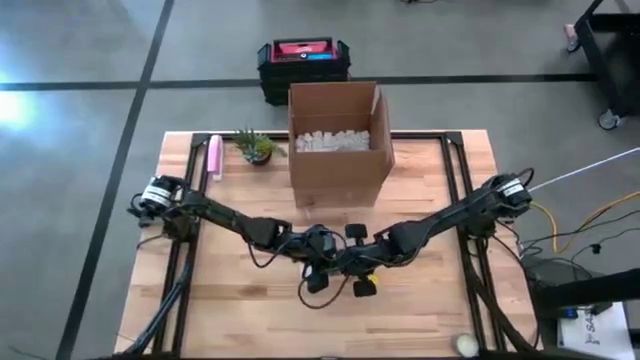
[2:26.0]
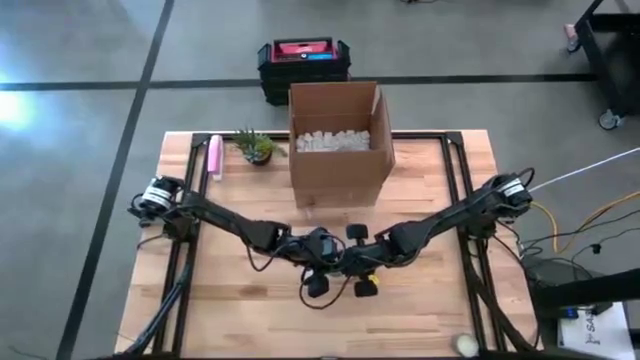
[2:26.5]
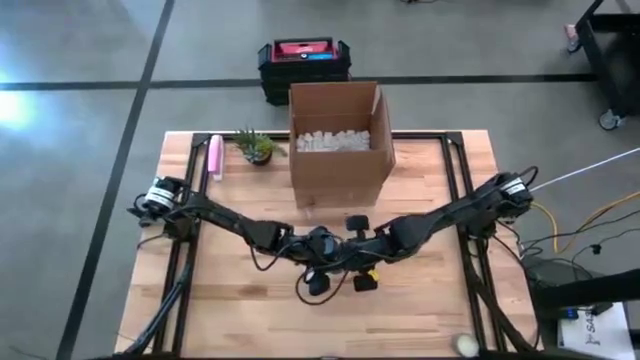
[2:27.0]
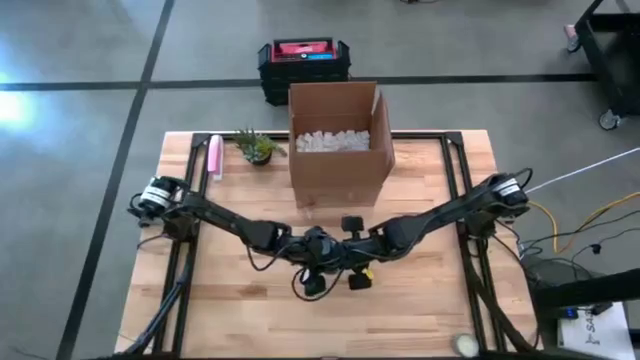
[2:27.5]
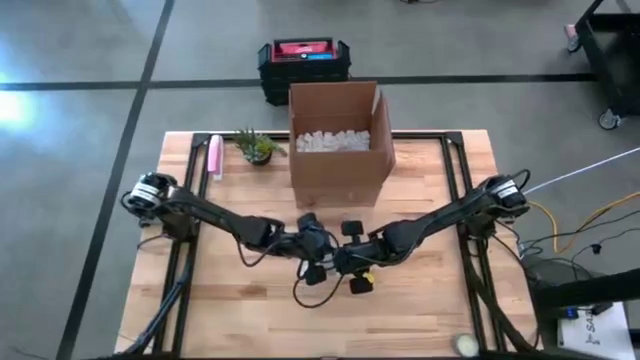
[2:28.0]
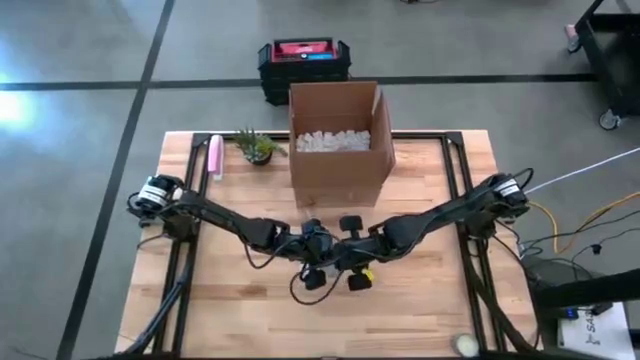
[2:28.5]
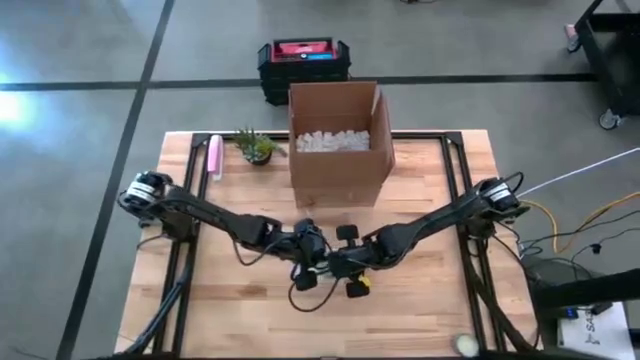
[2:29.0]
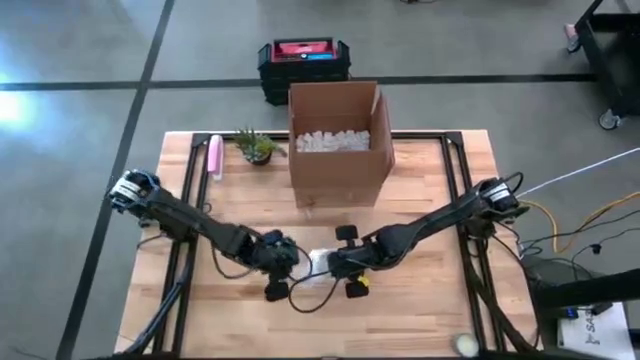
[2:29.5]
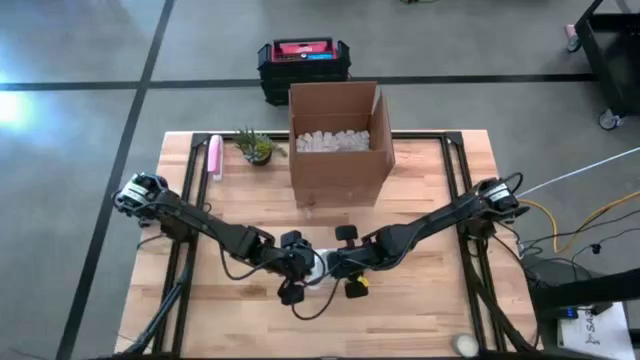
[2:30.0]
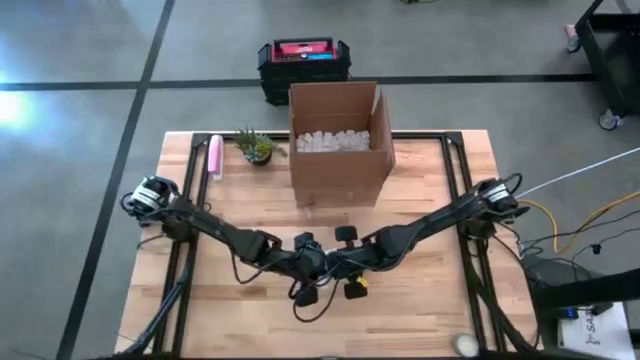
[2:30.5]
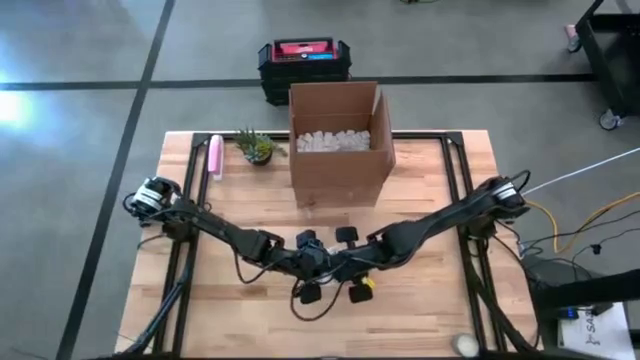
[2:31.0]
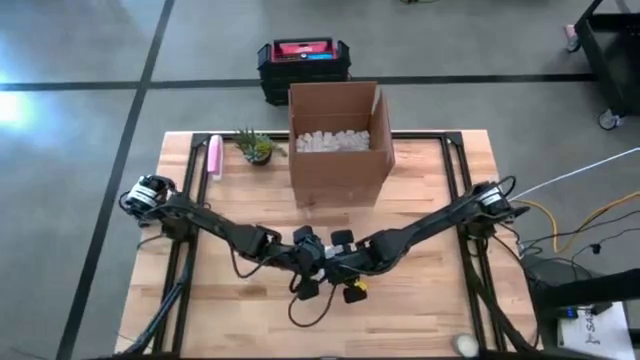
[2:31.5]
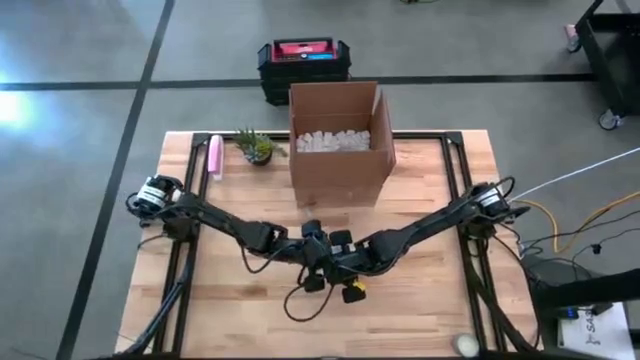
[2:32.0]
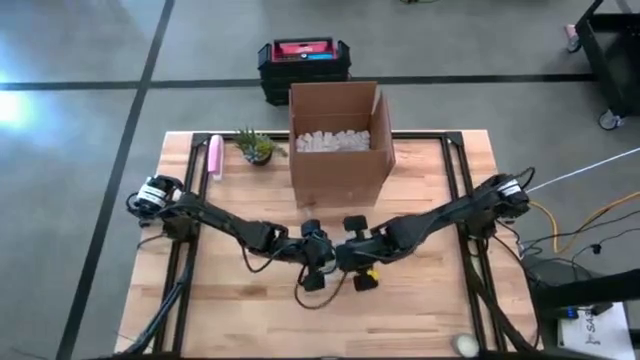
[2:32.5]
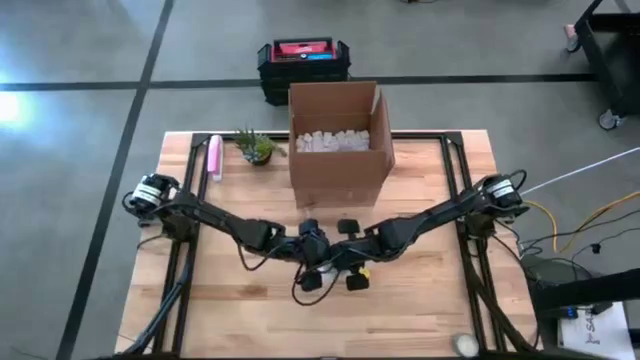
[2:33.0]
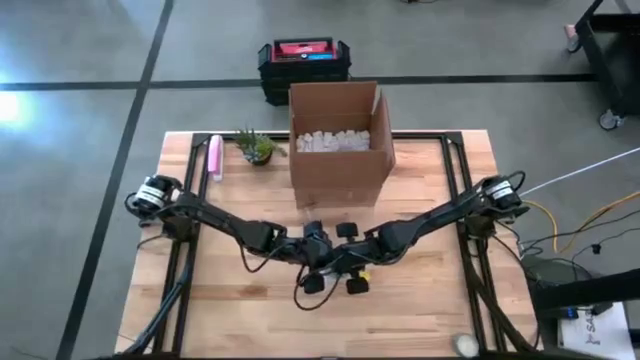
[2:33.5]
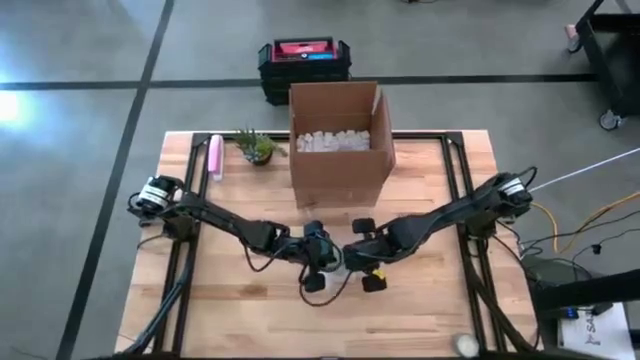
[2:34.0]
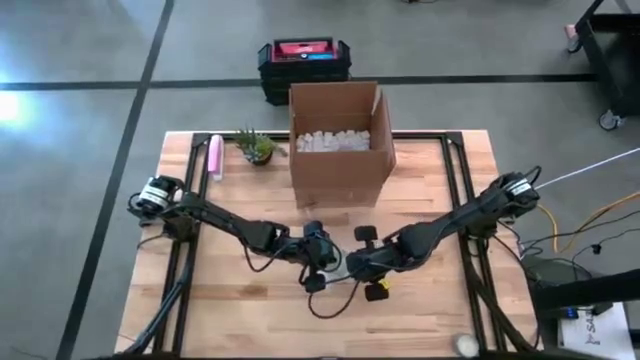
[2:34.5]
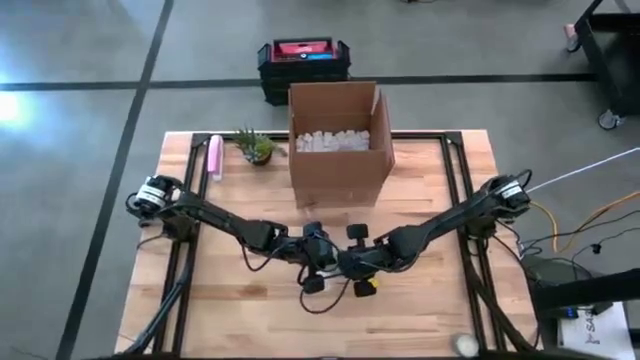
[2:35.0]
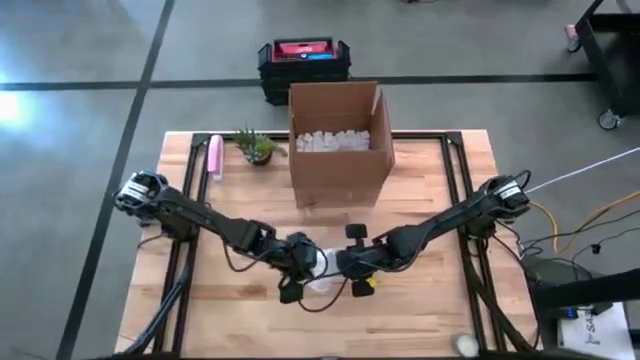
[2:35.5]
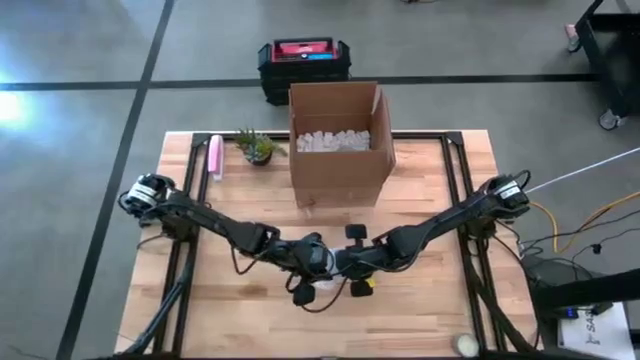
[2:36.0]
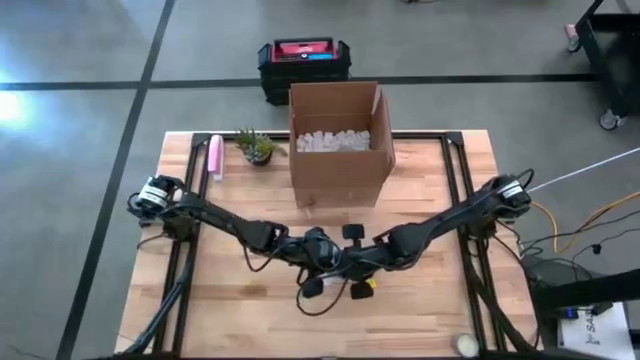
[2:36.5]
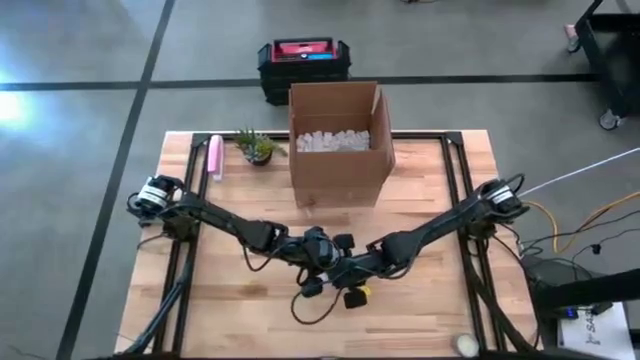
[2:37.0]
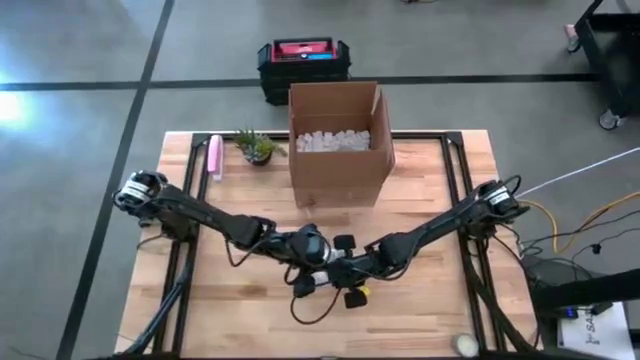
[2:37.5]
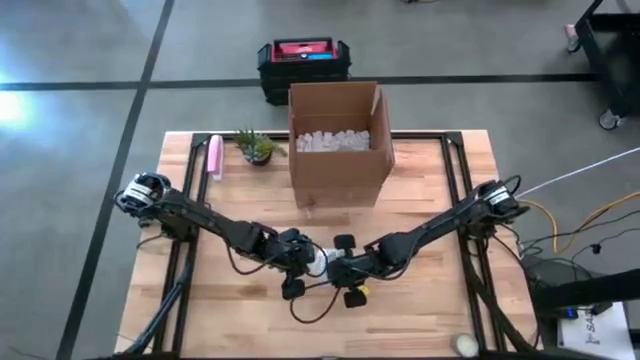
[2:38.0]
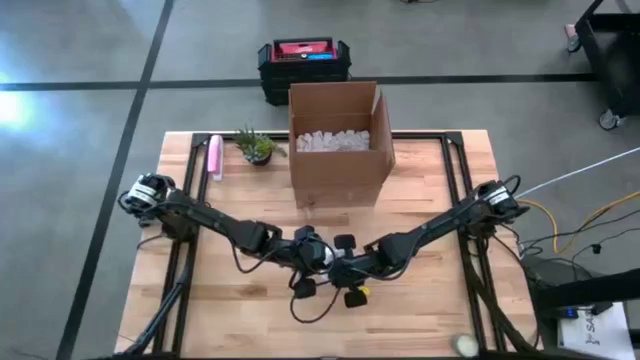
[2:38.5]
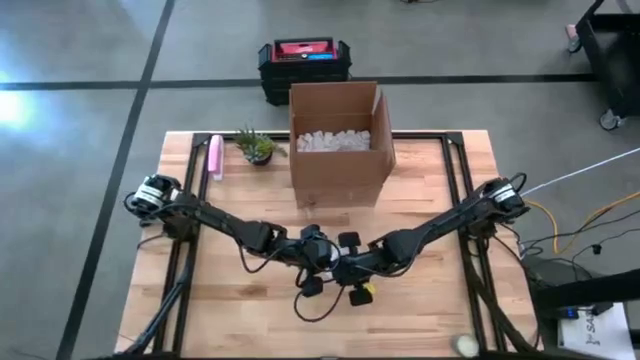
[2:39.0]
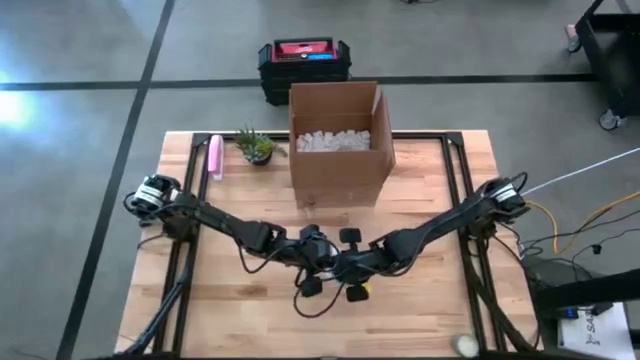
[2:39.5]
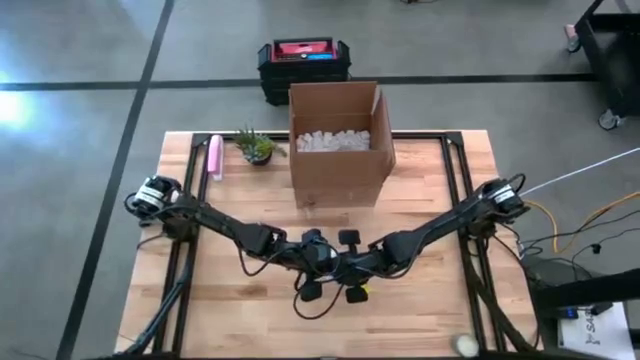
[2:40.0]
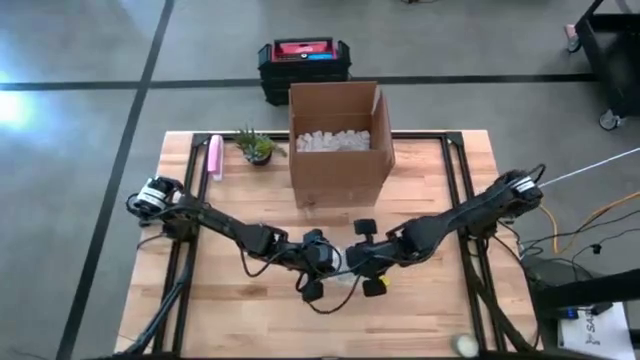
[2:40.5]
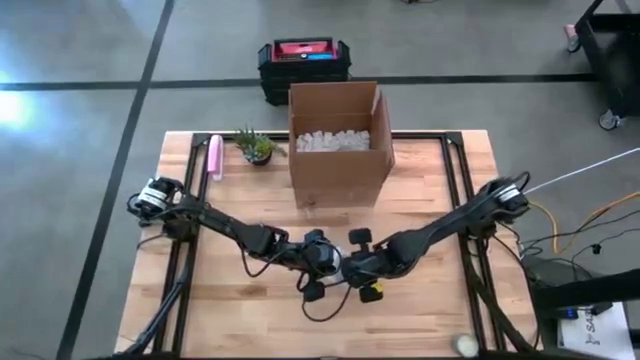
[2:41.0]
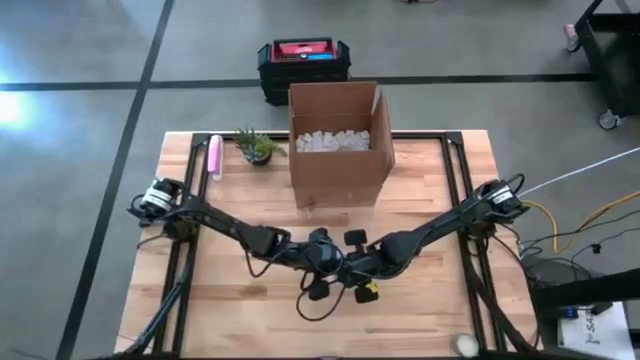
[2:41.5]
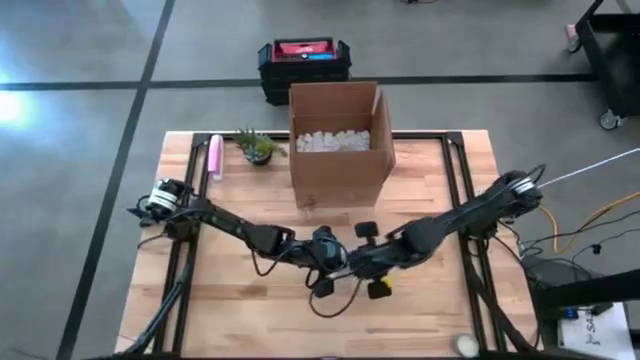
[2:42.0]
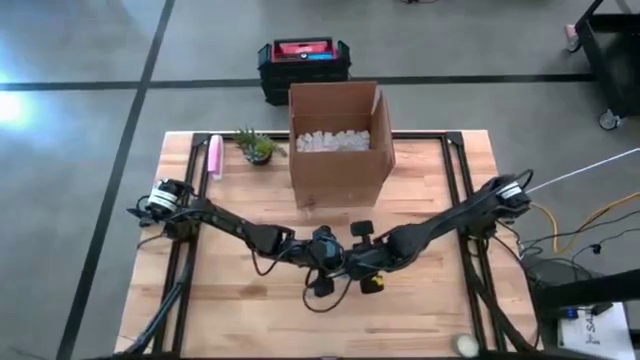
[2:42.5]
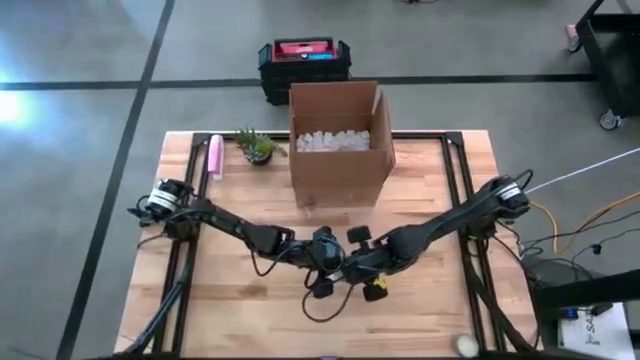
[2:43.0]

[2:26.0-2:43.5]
Task: wrap mug
Wrap the orange patterned mug using the bubble wrap

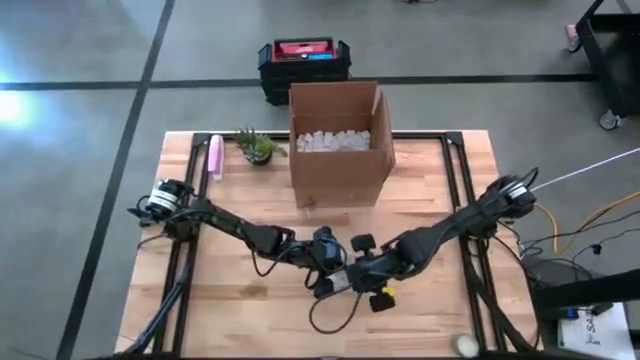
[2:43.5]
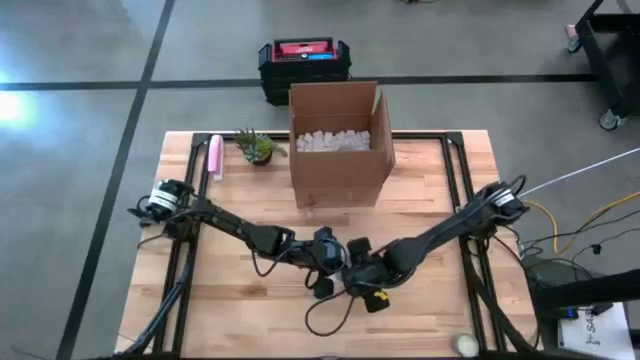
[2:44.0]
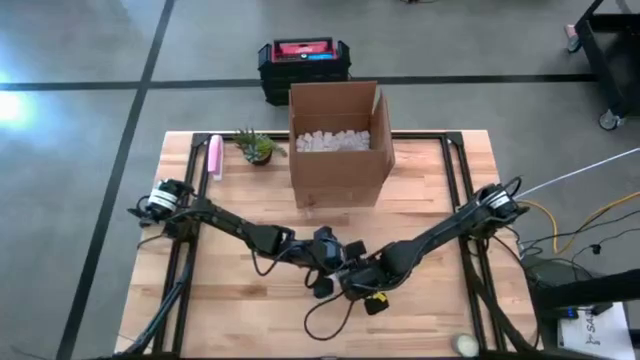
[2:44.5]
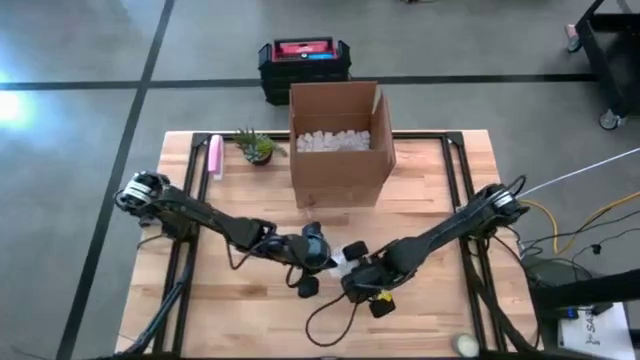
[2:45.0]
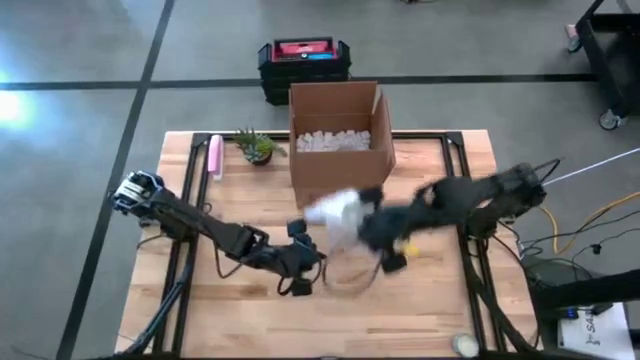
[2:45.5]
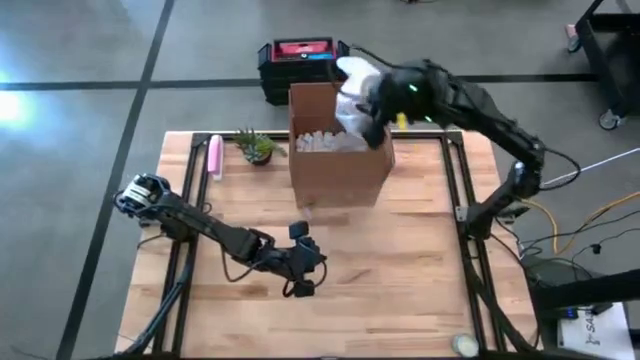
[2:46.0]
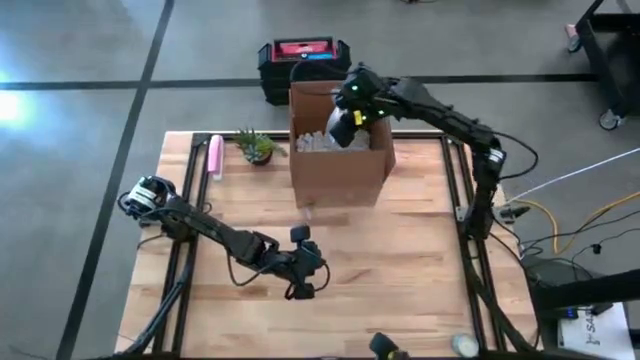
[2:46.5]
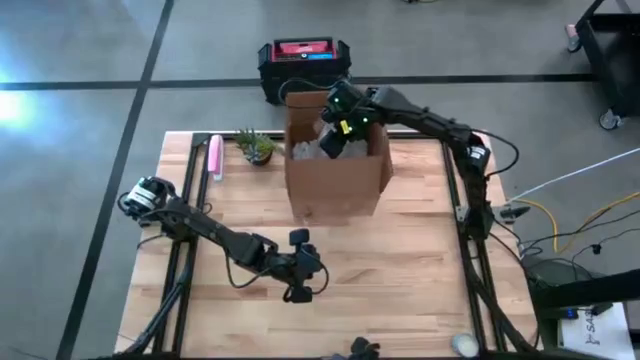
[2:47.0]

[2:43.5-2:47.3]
Put the wrapped orange patterned mug into the cardboard box
